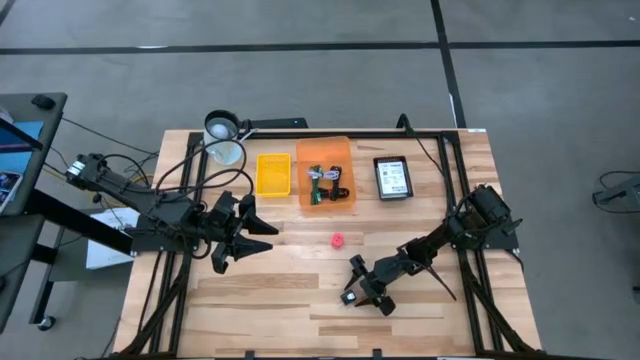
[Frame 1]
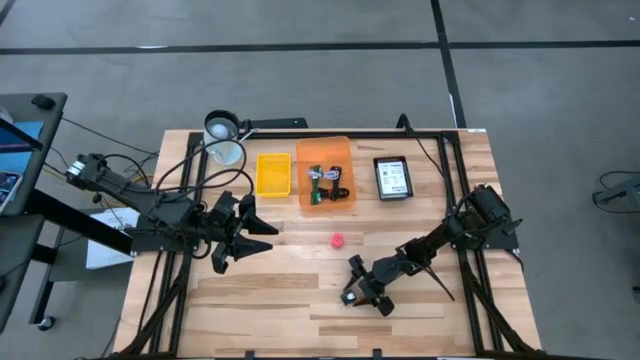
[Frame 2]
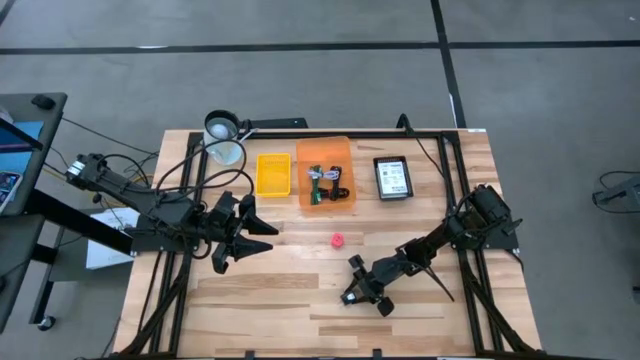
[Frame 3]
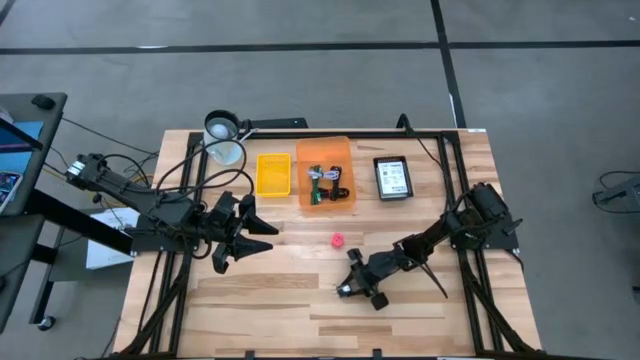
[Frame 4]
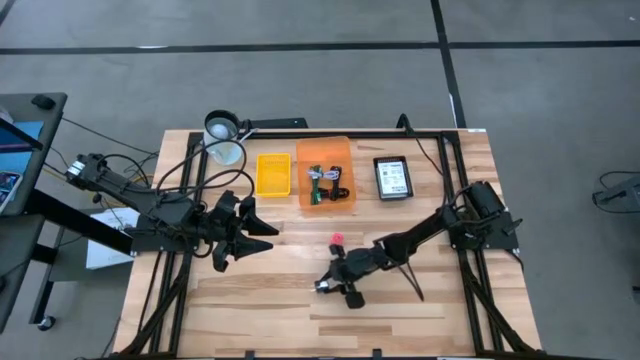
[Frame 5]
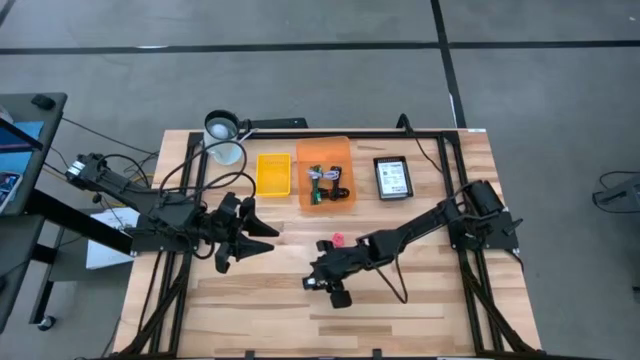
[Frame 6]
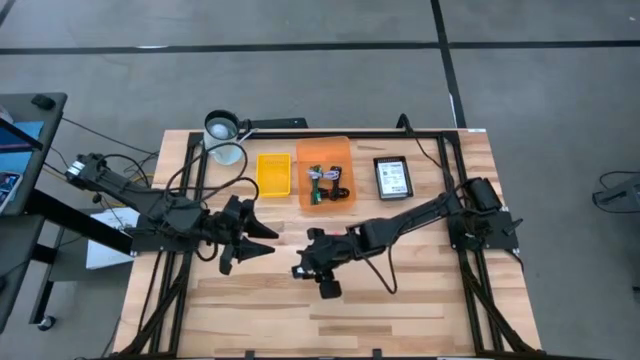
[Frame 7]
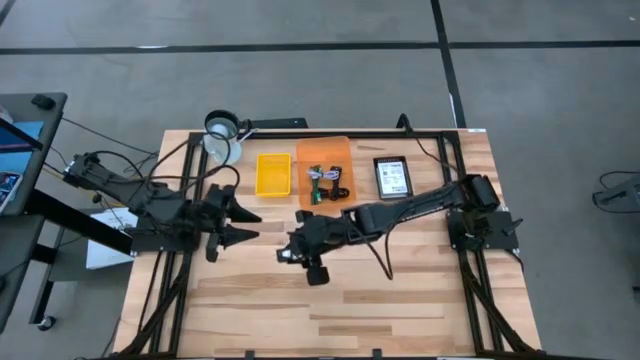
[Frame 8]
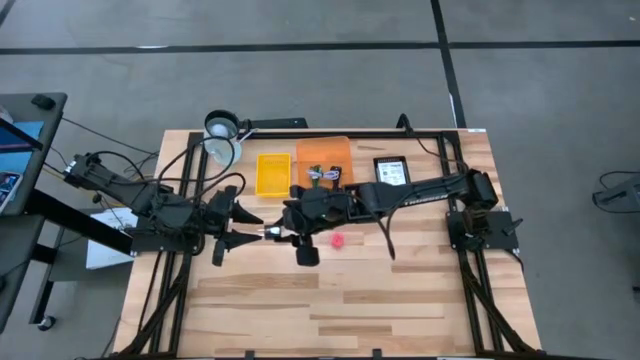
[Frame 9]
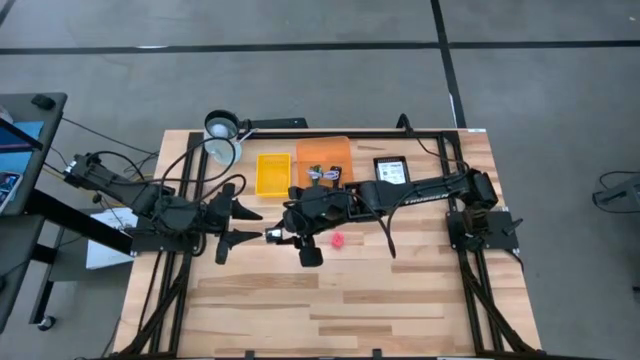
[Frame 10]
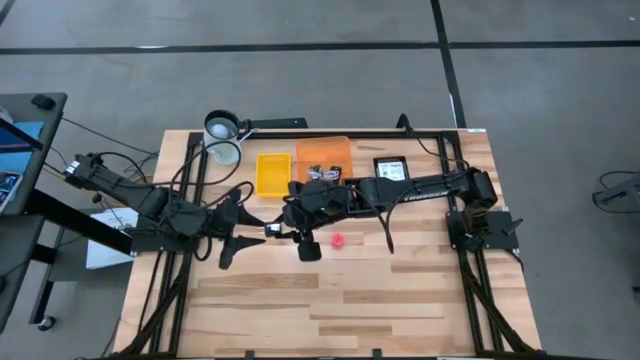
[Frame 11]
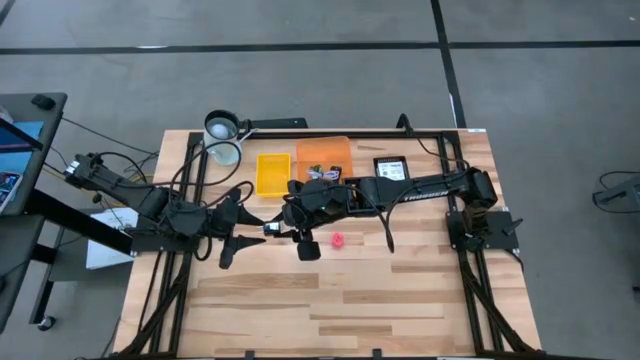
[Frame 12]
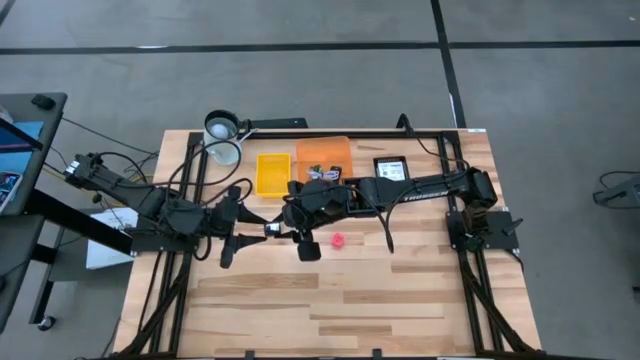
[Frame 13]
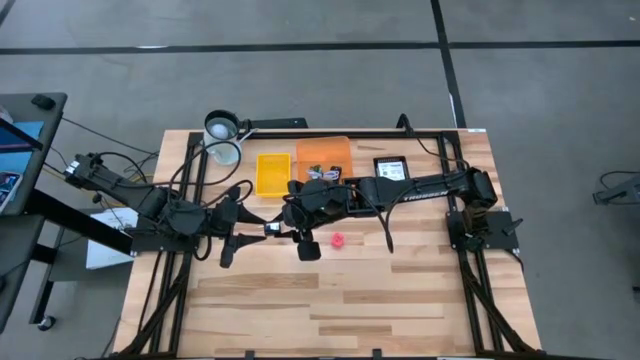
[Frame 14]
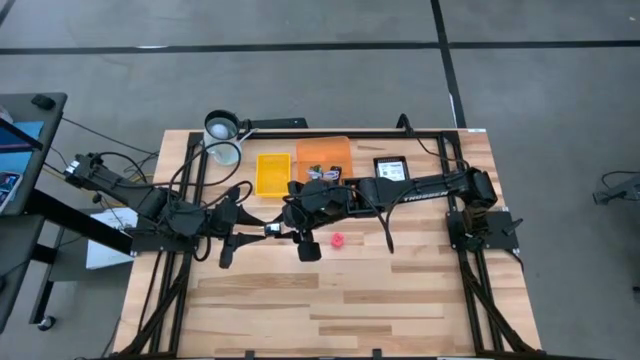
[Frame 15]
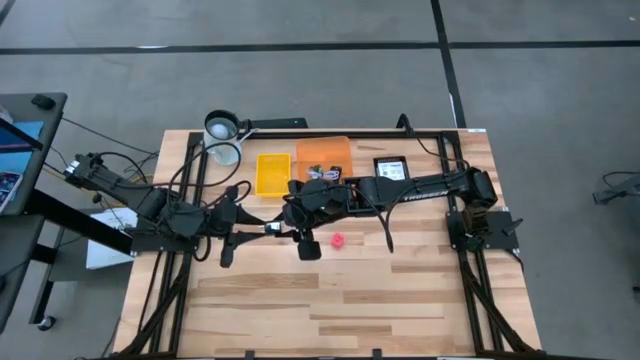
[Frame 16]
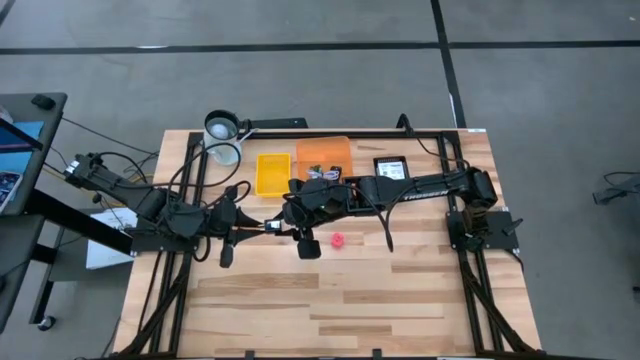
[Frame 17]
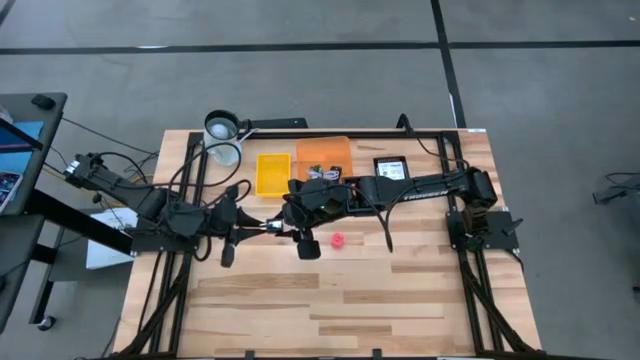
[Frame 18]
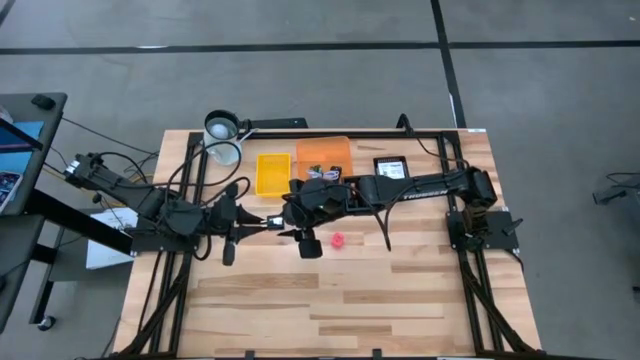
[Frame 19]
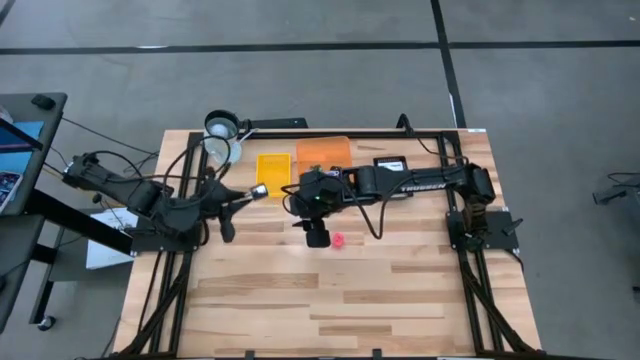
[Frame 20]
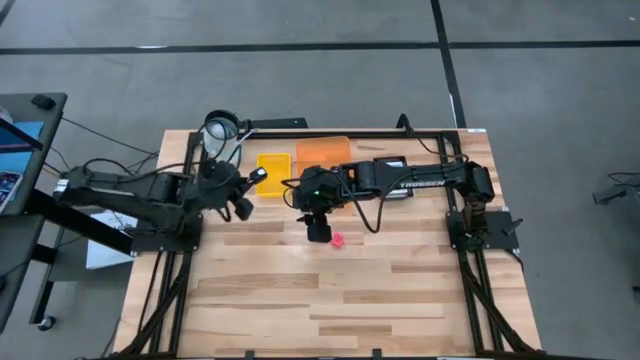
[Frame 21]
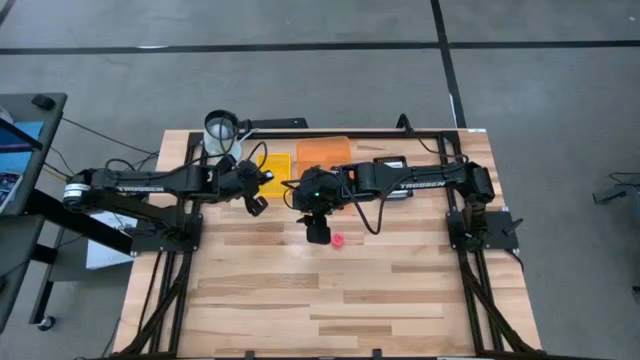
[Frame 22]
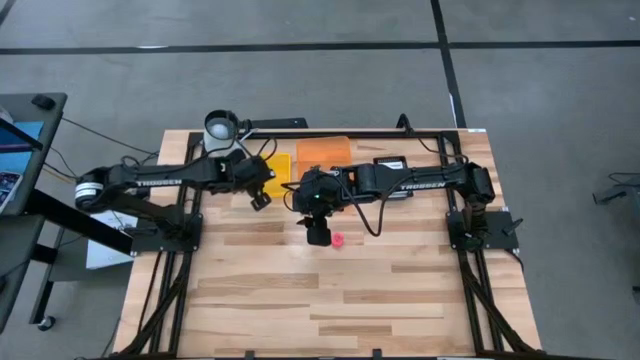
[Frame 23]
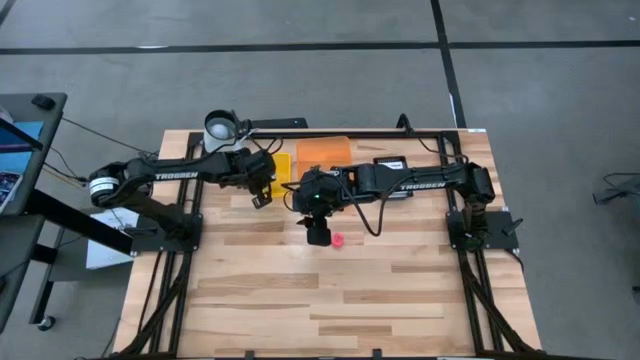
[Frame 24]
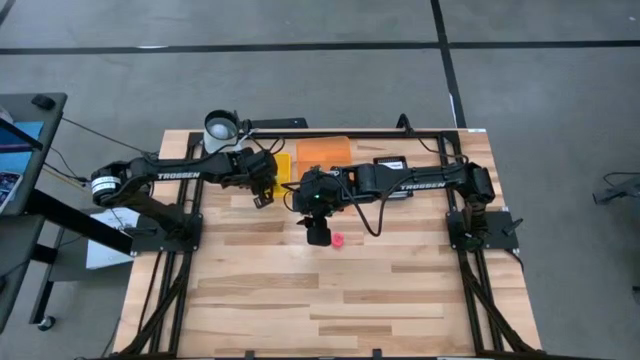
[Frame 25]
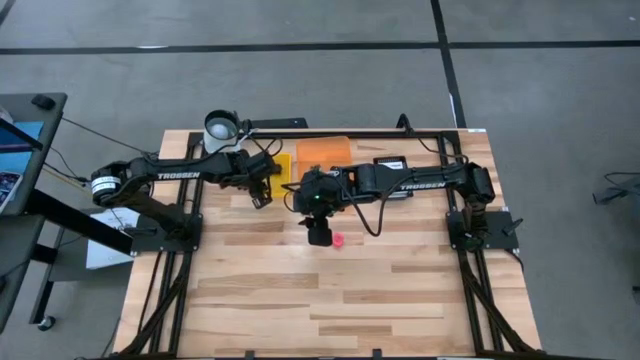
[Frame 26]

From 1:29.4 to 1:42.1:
Task: Pick and place items into bin
Put the black charger adapter into the yellow bin

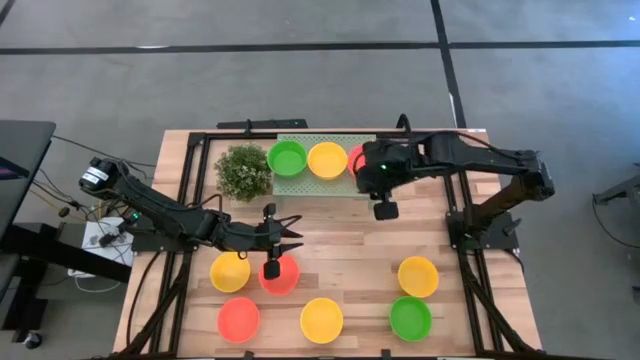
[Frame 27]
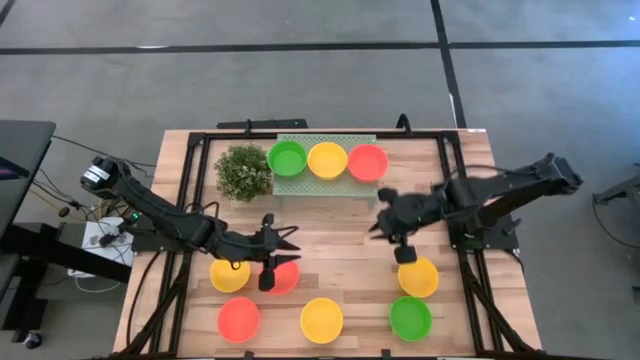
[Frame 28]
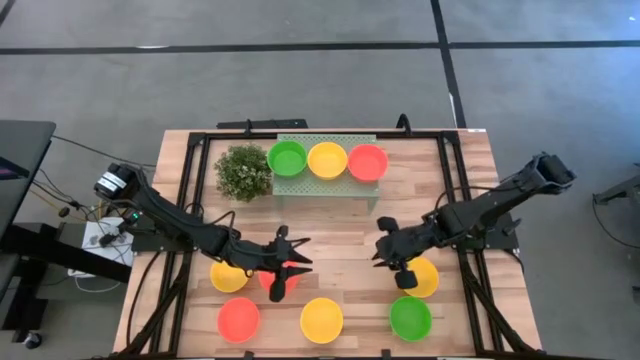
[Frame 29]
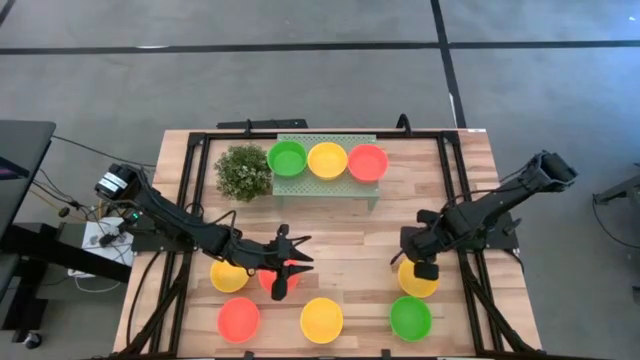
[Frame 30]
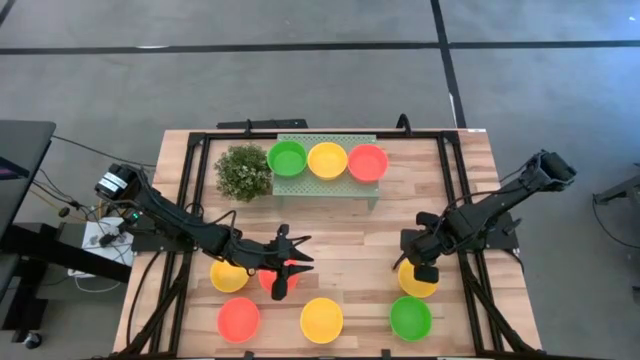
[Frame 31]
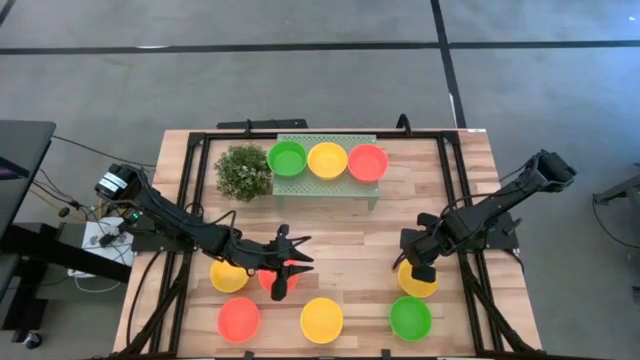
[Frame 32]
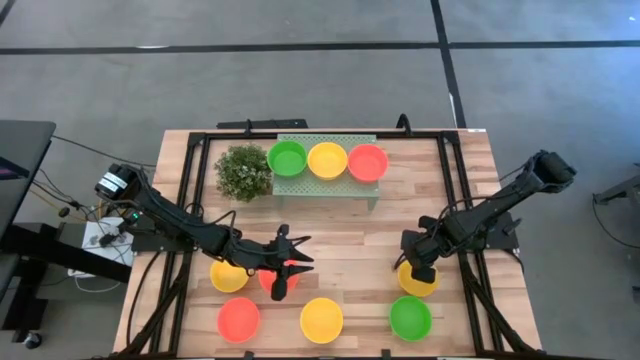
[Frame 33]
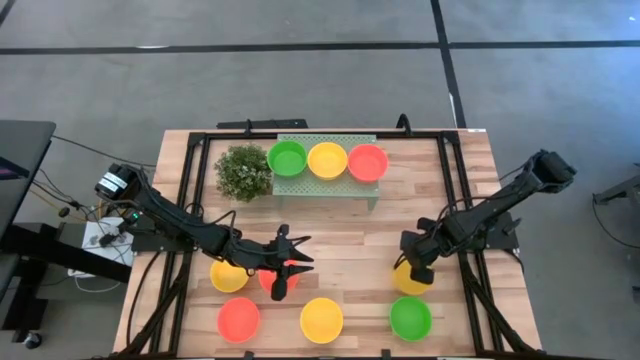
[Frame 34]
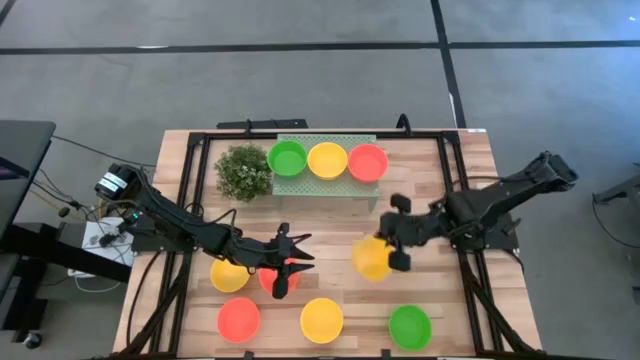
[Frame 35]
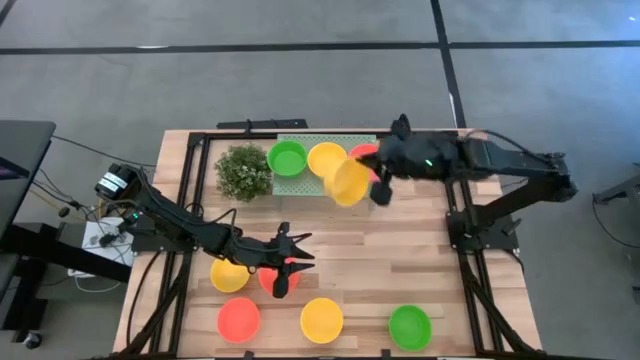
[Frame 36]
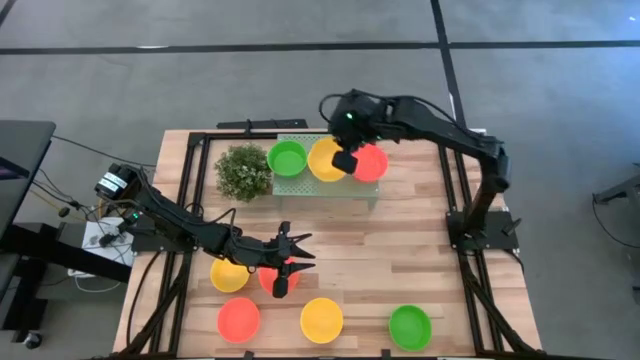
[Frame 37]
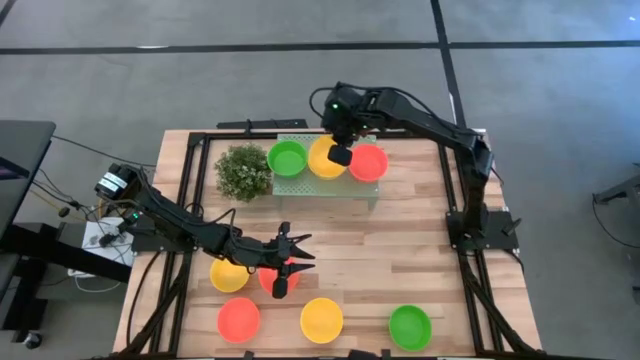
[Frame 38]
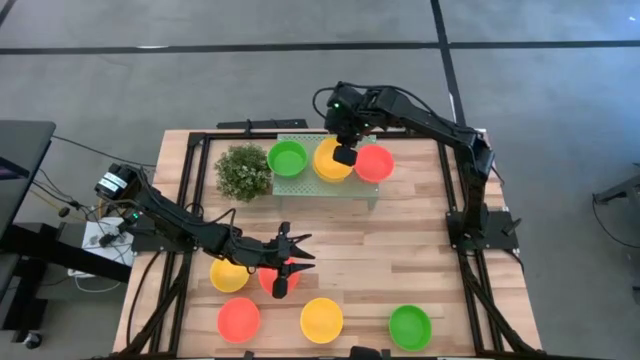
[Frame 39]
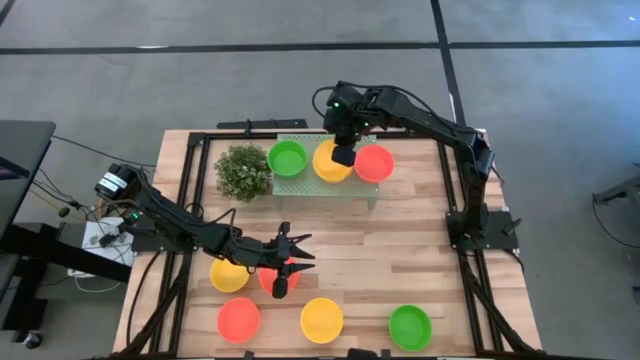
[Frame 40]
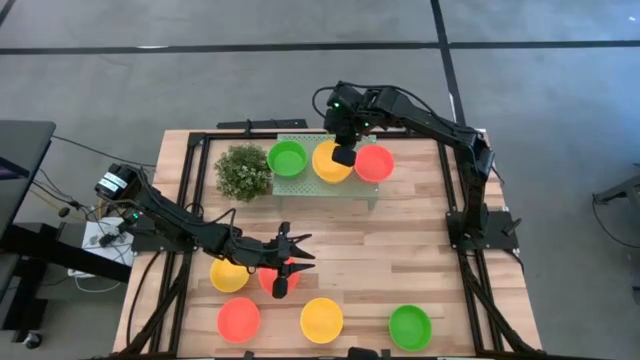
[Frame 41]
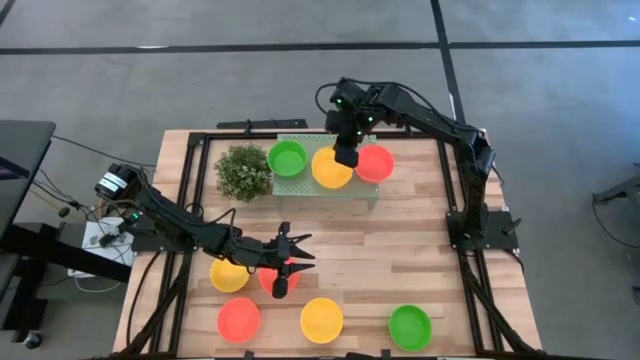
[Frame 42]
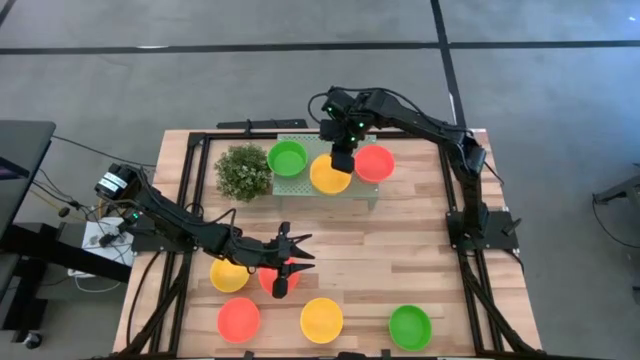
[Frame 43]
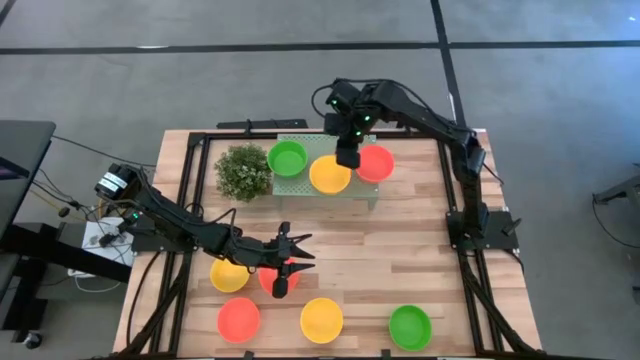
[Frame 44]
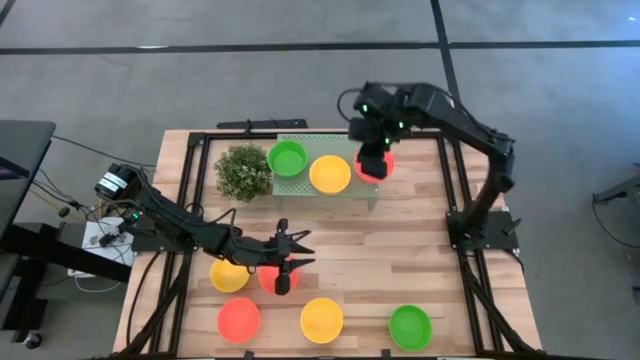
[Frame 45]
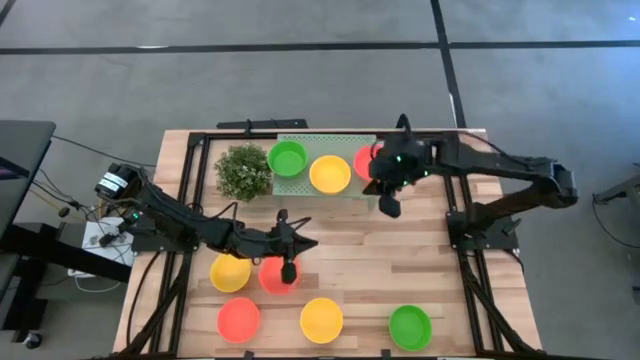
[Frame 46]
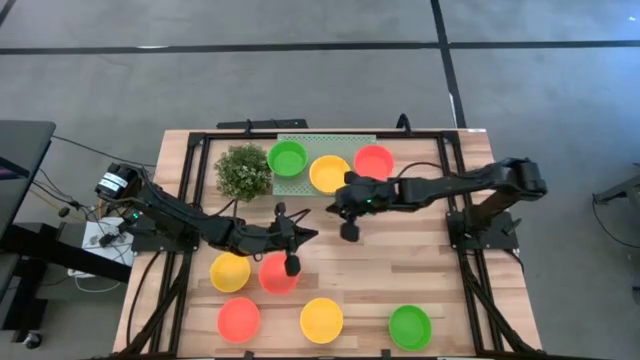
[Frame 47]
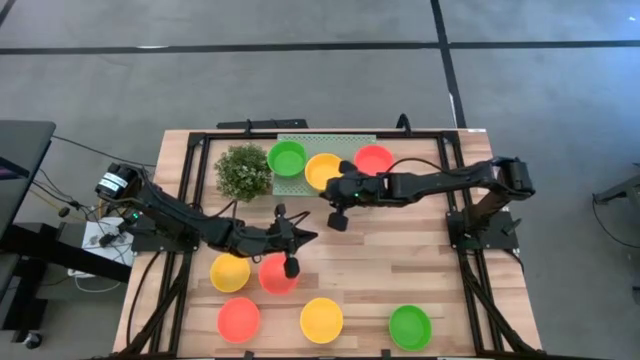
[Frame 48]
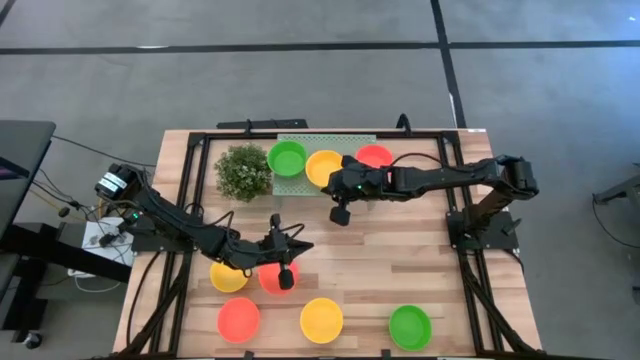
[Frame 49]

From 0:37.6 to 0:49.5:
Task: Pick & Place Mini bowls
Stack the yellow bowl on the yellow bowl on the shelf
